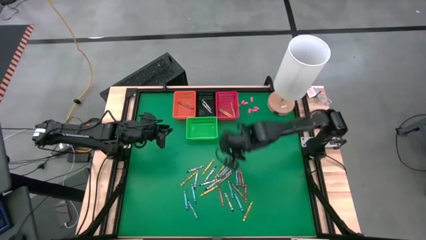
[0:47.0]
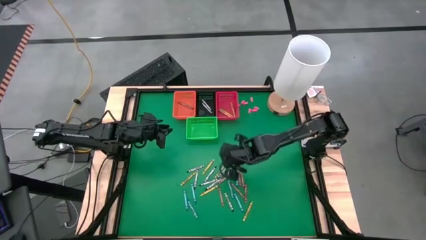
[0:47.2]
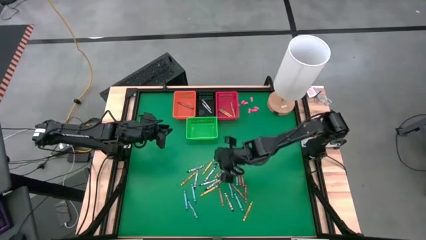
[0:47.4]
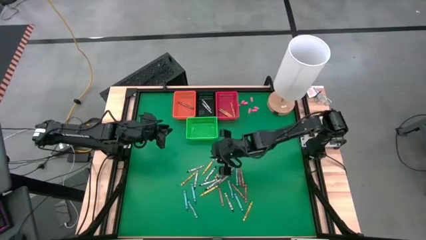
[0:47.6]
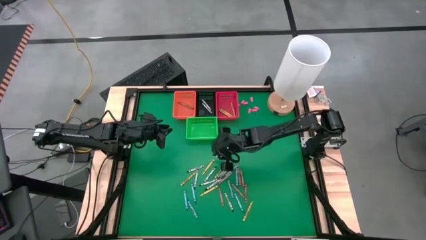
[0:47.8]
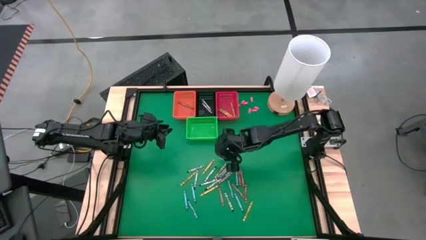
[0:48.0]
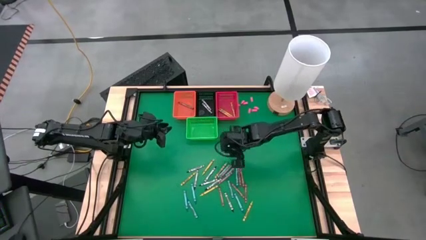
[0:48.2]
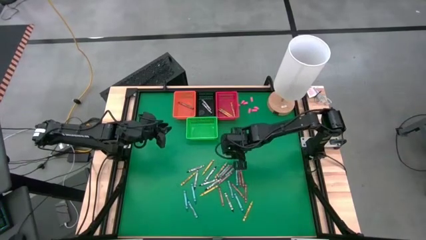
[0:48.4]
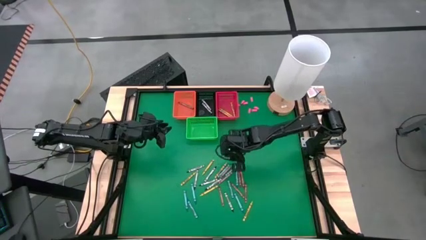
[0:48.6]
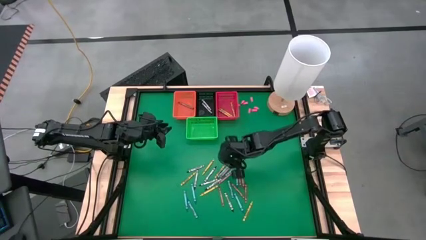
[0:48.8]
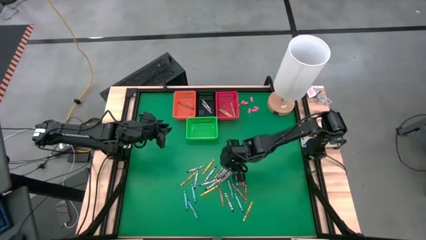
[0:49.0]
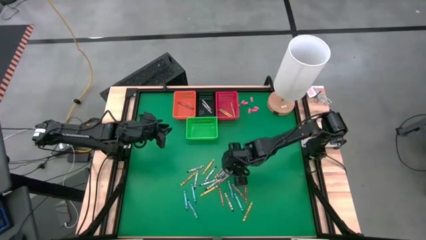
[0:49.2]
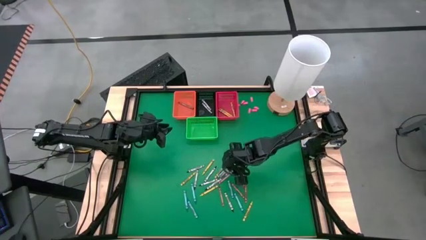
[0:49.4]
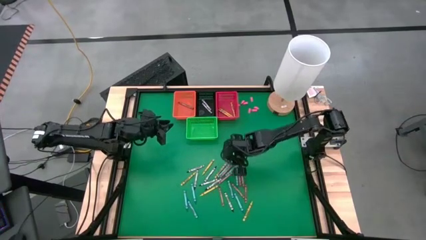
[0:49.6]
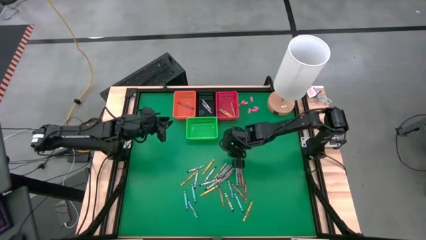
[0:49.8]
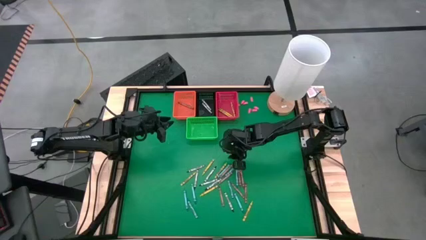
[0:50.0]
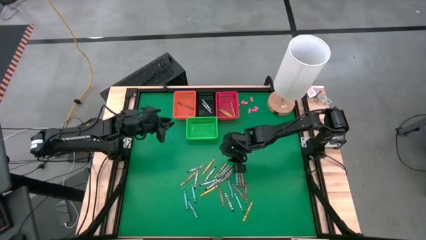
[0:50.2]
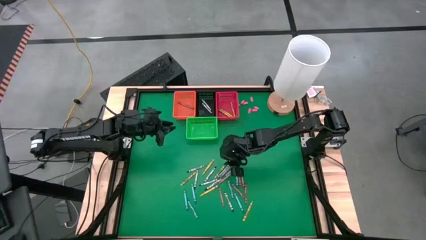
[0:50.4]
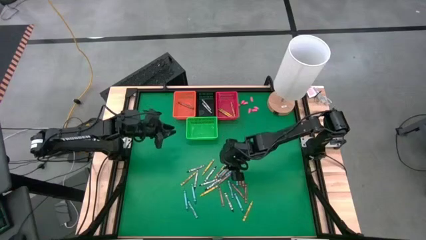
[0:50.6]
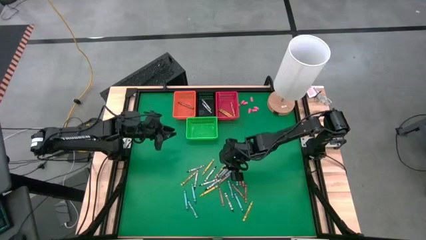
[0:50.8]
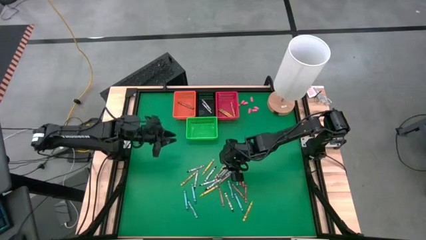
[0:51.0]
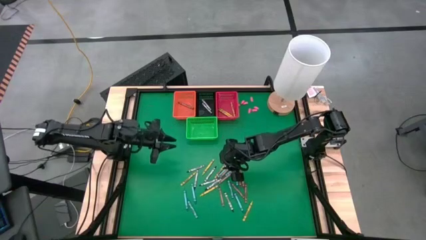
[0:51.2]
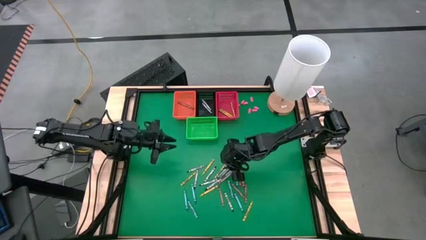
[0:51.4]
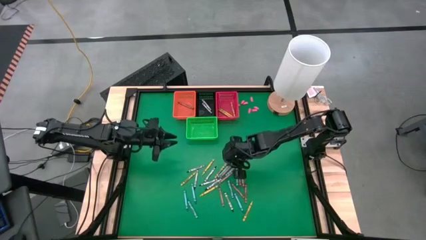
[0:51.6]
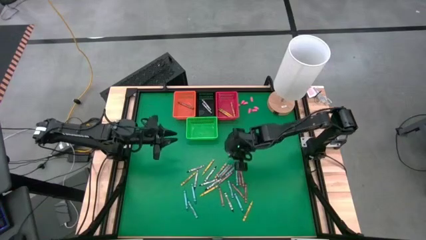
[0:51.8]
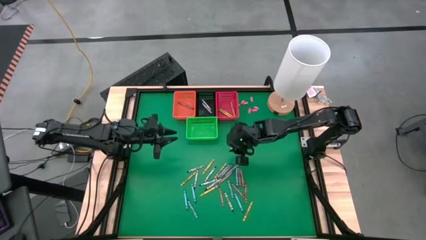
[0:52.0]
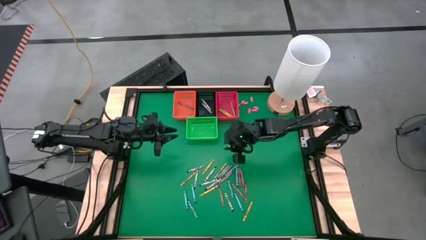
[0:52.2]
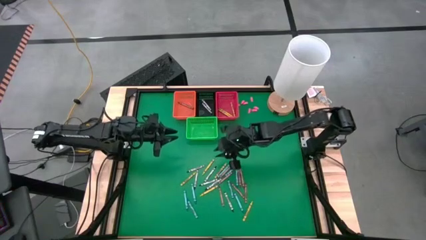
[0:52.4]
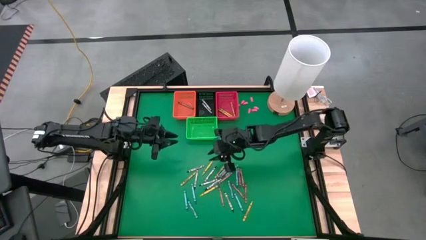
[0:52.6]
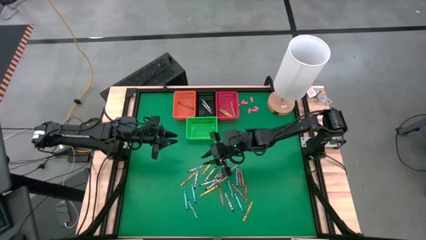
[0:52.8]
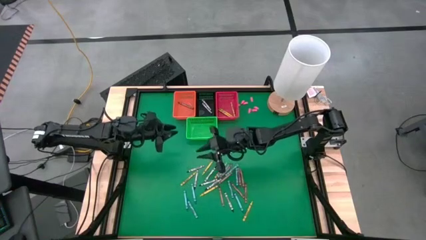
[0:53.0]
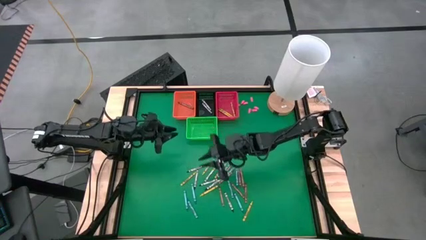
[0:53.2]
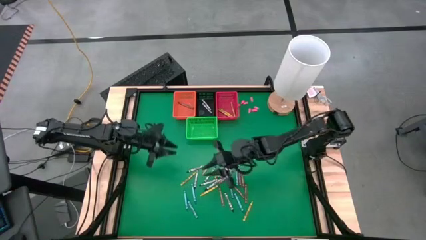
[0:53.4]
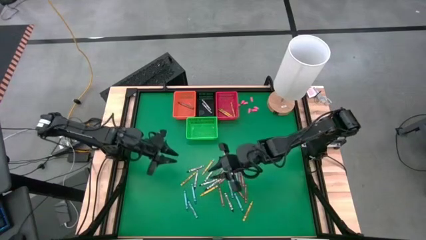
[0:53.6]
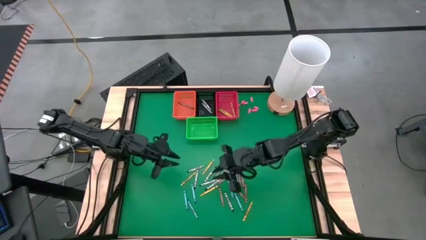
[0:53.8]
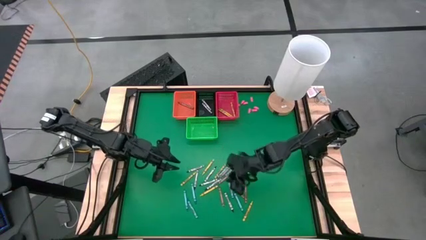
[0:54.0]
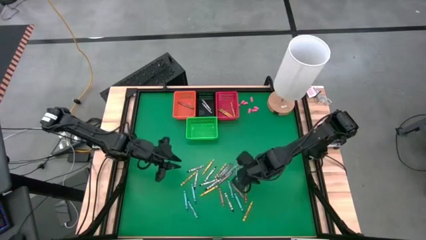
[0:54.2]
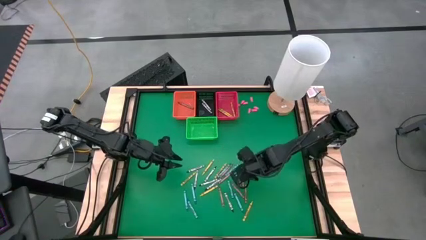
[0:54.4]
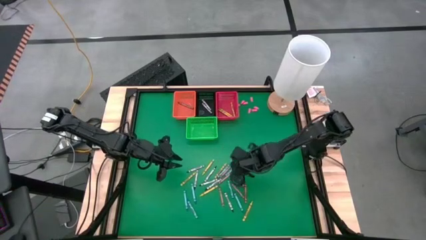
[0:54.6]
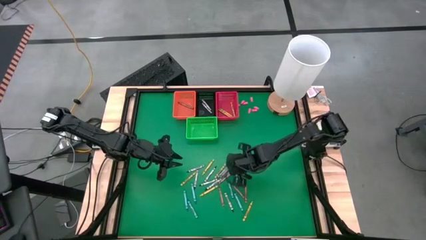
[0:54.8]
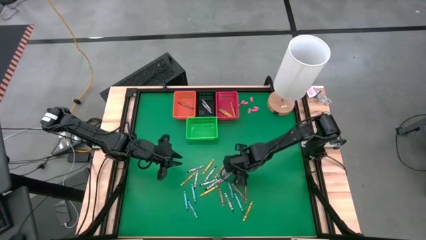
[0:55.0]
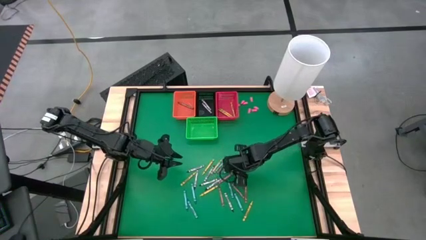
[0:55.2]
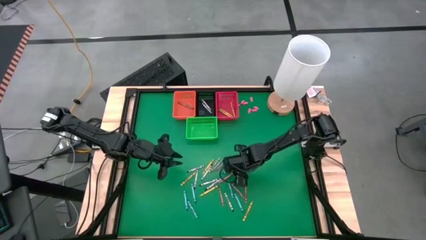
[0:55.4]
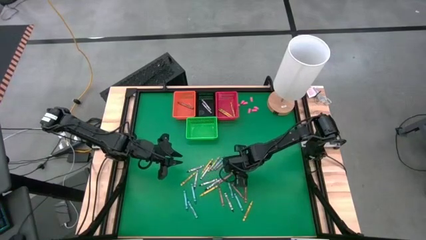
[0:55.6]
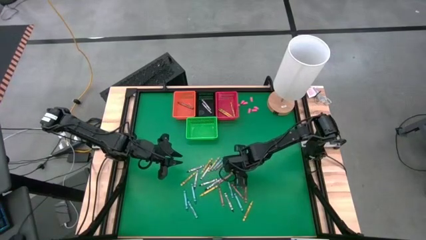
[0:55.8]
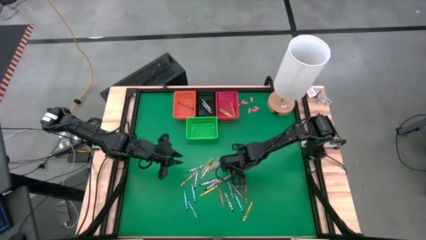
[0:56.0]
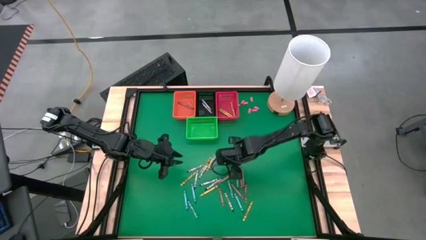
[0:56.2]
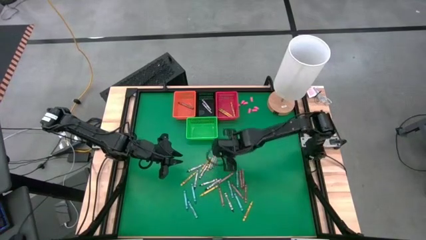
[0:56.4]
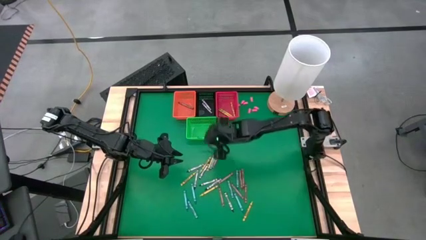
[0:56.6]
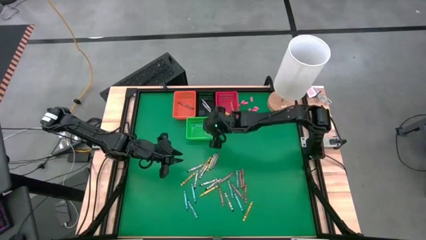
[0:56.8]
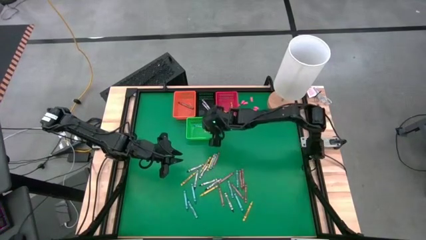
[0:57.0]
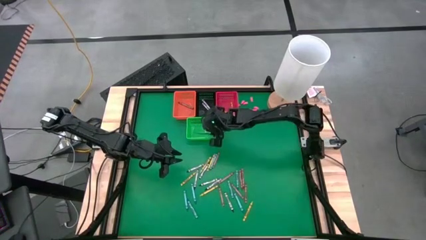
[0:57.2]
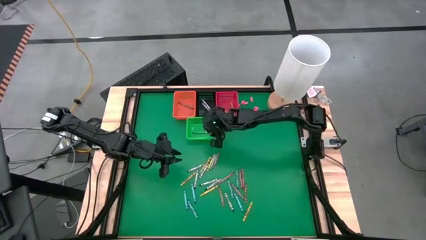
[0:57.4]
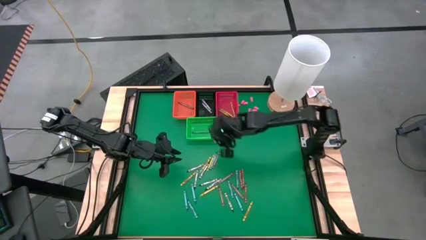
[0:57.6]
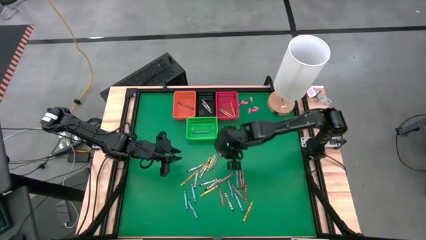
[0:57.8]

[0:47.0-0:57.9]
Task: Sort crayons
Put a blue crayon in the green basket

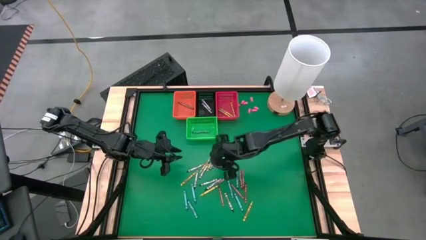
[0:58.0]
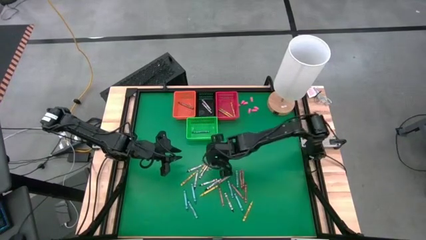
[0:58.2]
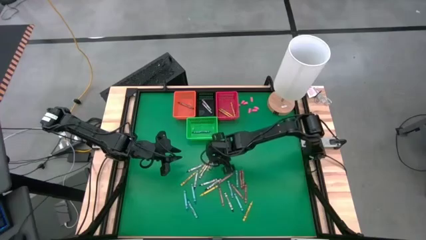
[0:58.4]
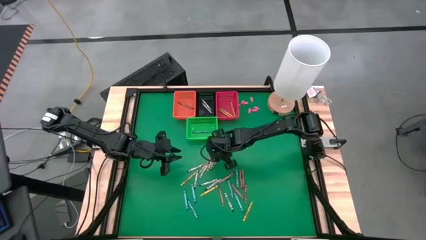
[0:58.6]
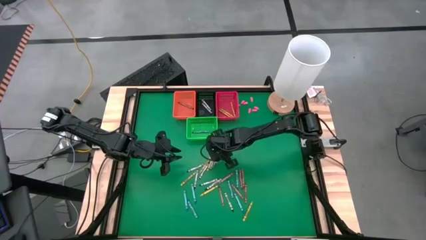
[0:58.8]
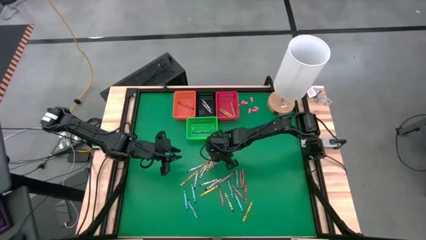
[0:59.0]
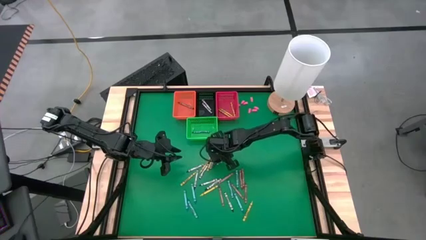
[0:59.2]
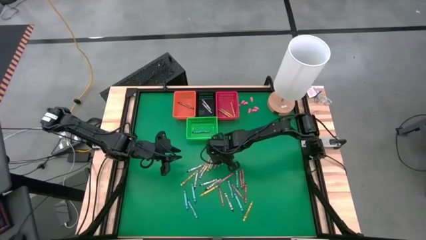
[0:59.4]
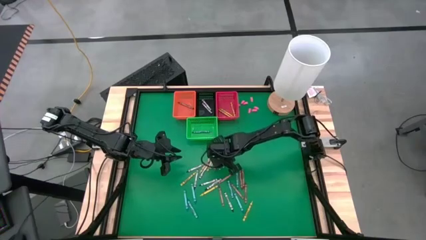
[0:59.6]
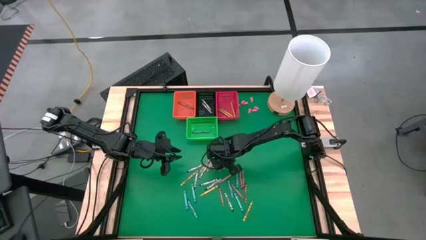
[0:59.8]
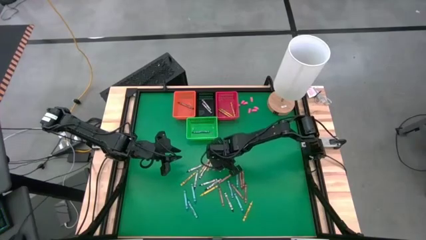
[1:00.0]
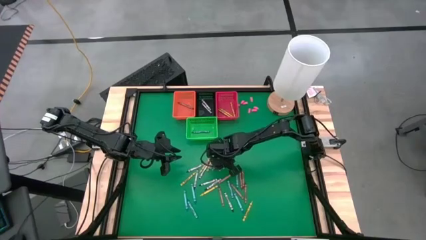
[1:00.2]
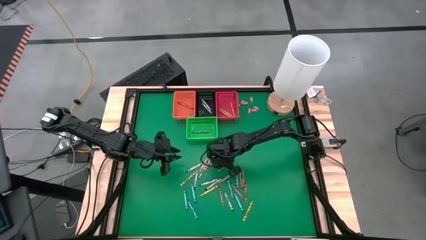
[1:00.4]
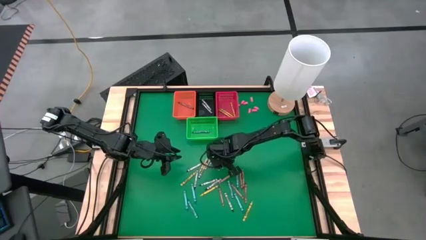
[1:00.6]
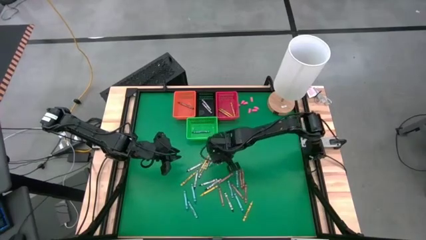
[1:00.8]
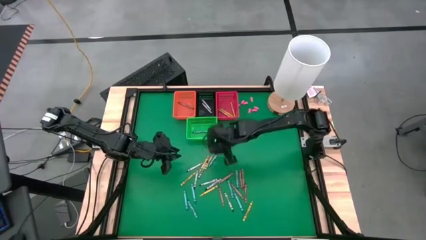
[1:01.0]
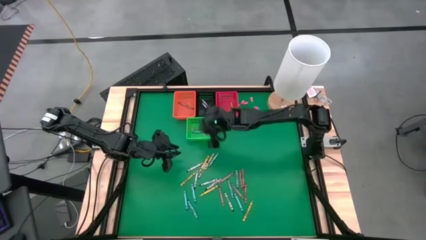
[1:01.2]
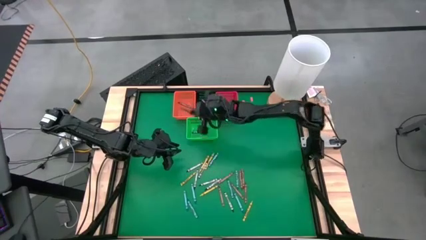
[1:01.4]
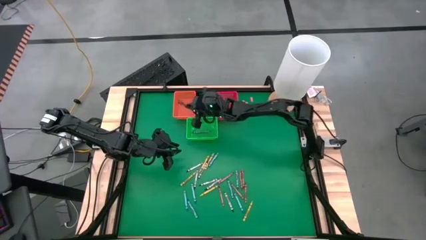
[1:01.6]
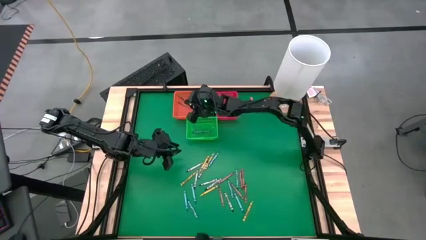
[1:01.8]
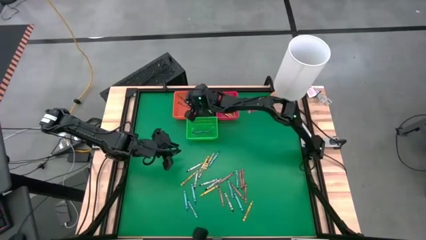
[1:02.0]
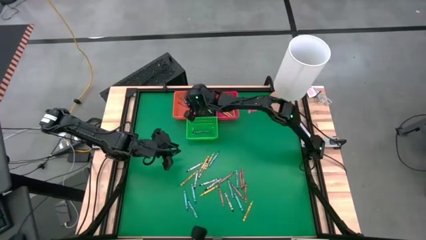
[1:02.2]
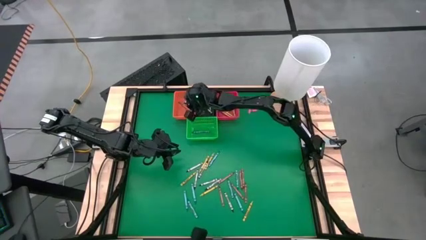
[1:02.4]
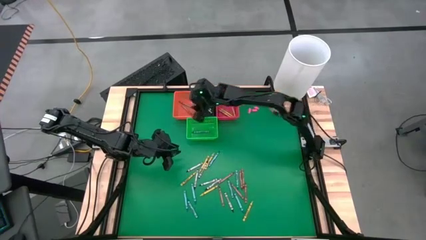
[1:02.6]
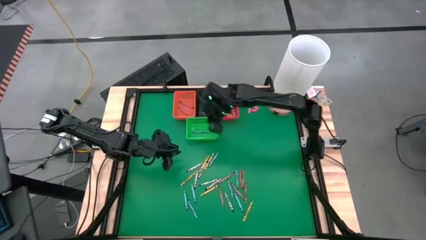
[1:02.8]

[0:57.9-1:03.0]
Put a red crayon in the orange basket
